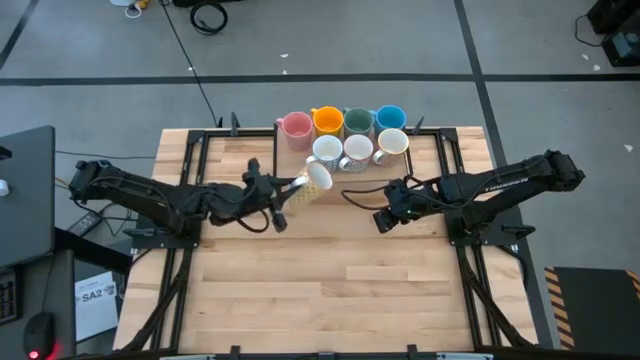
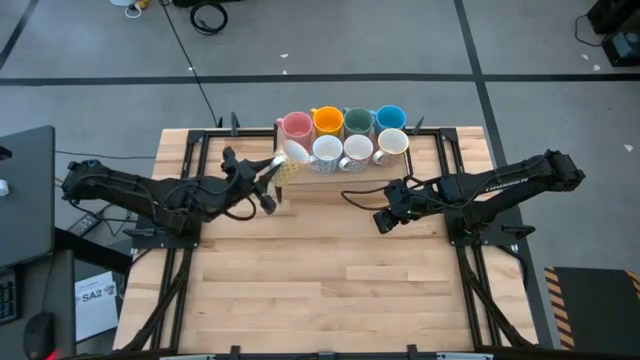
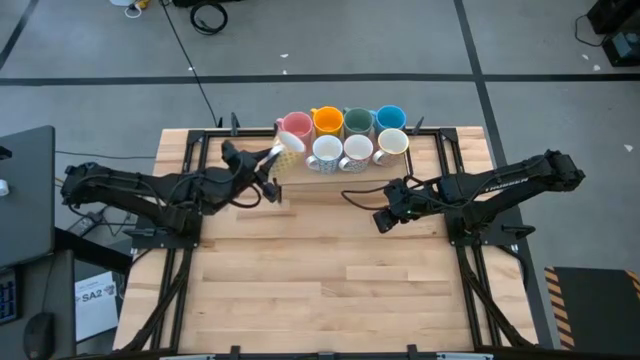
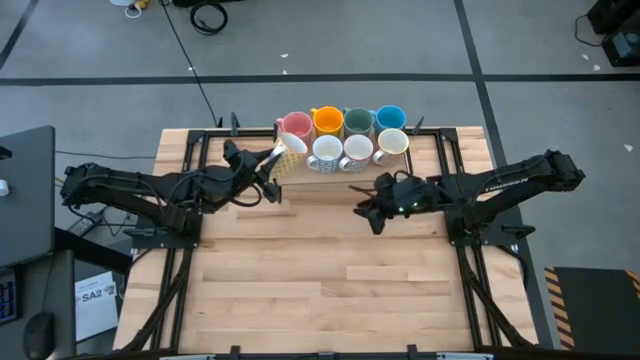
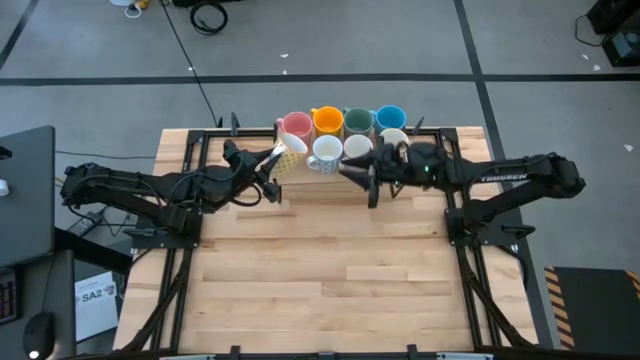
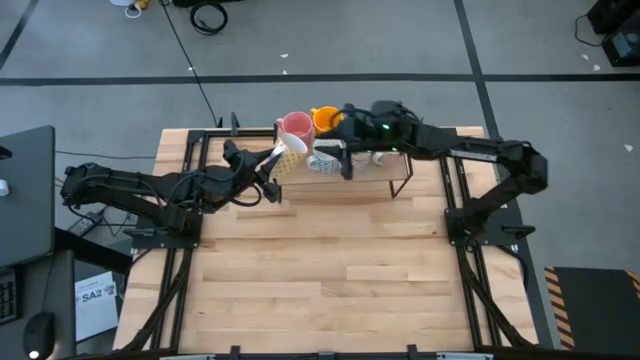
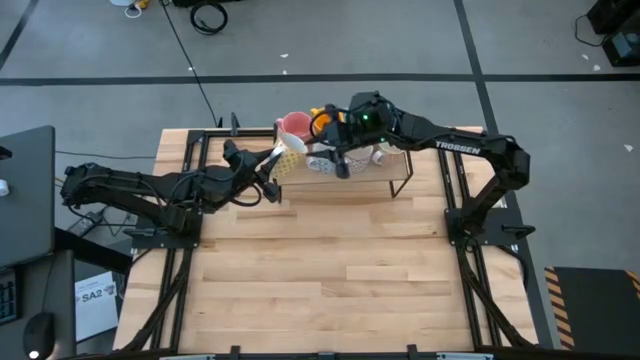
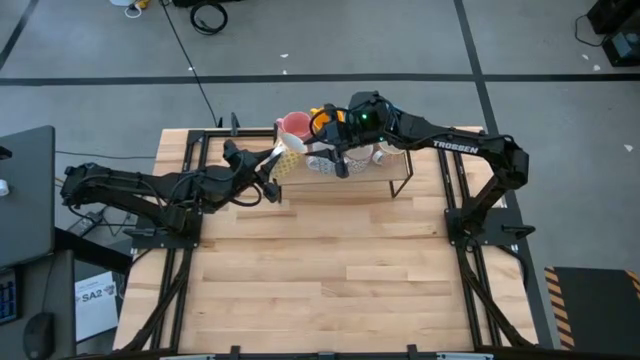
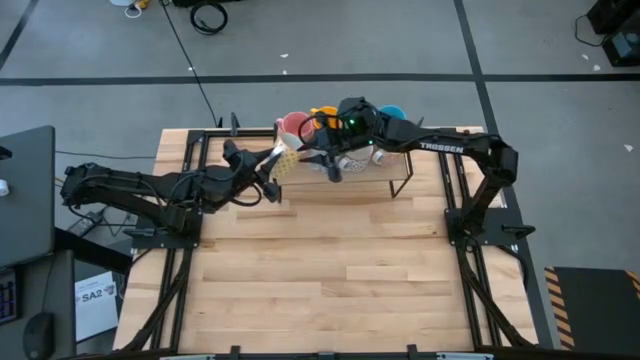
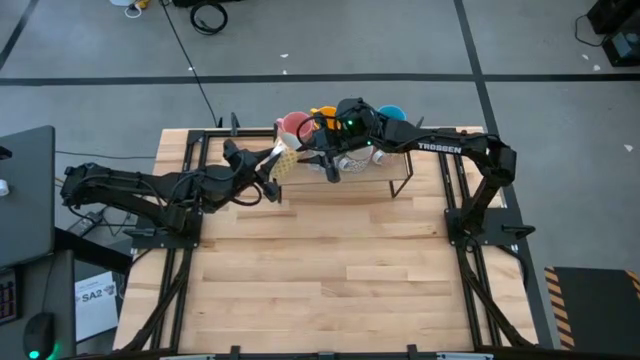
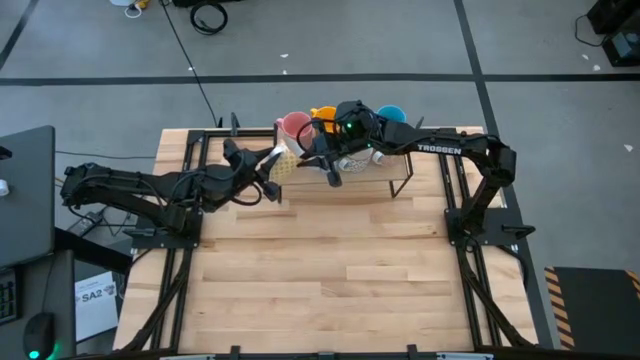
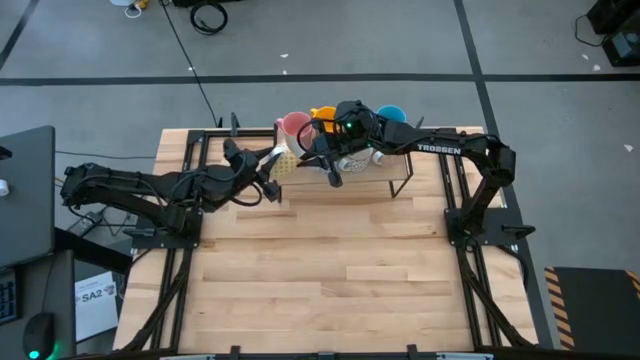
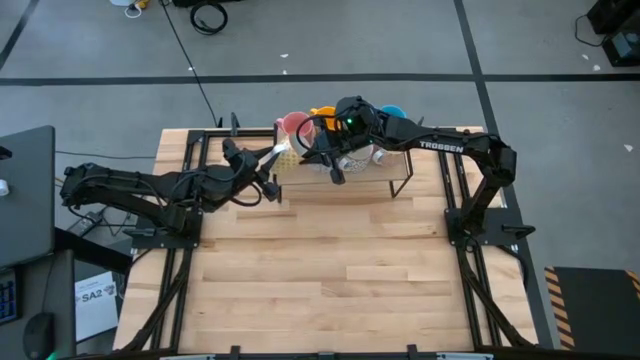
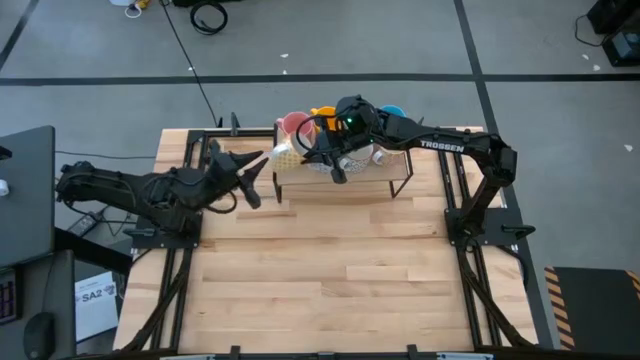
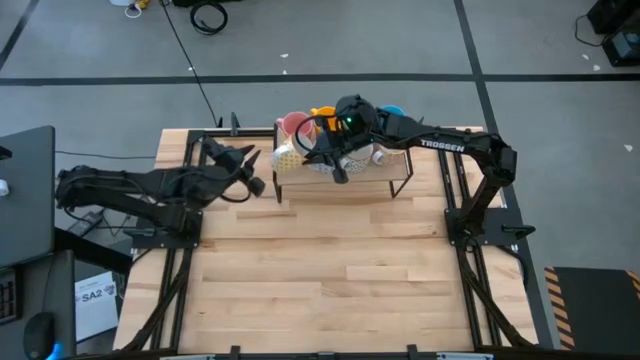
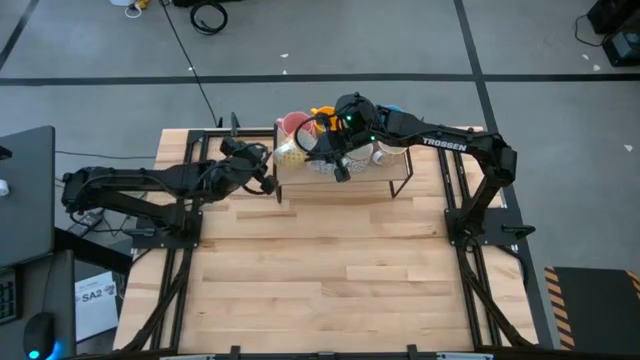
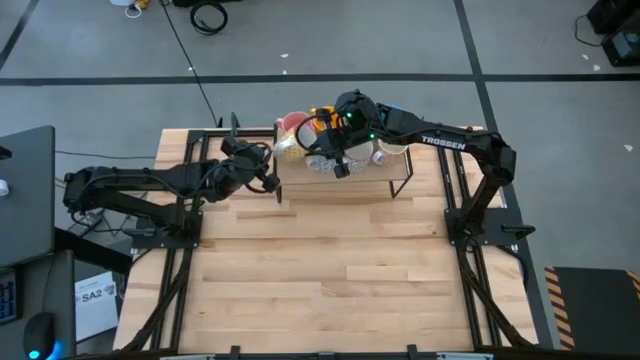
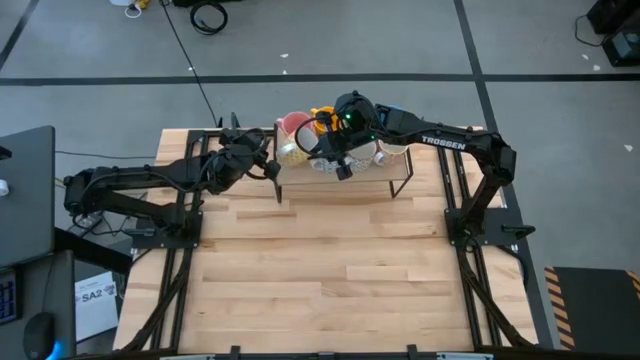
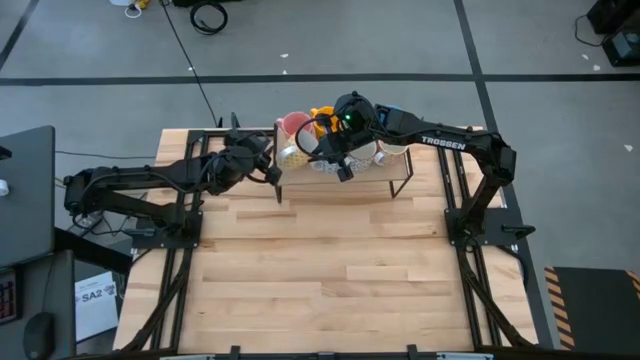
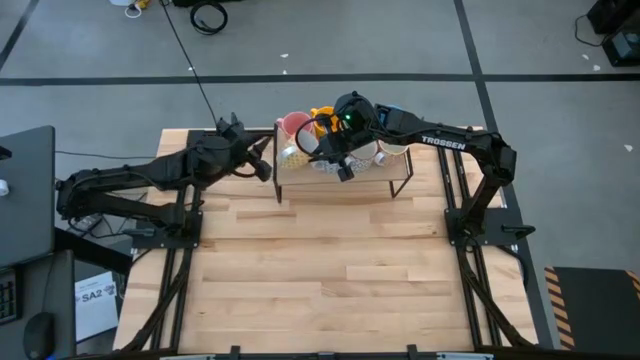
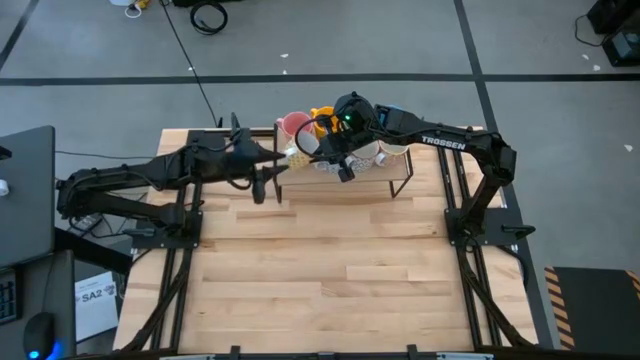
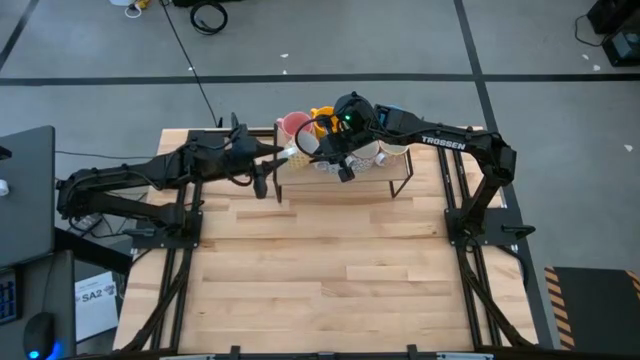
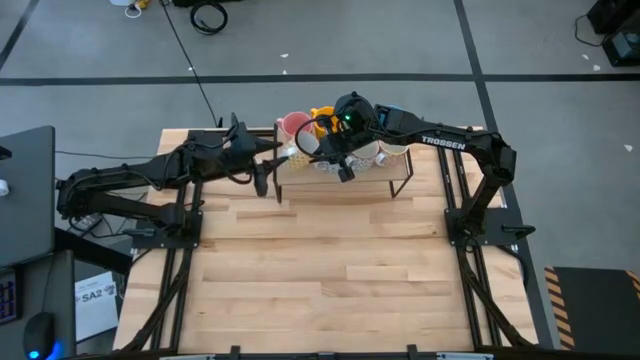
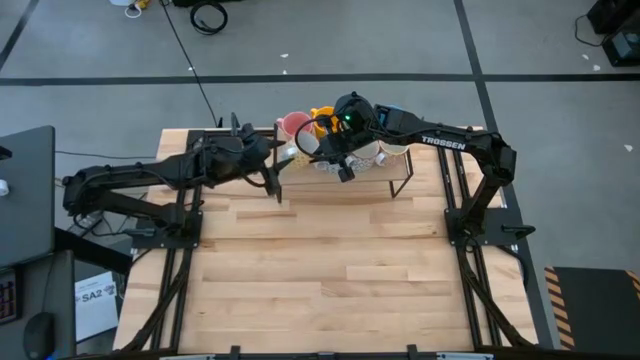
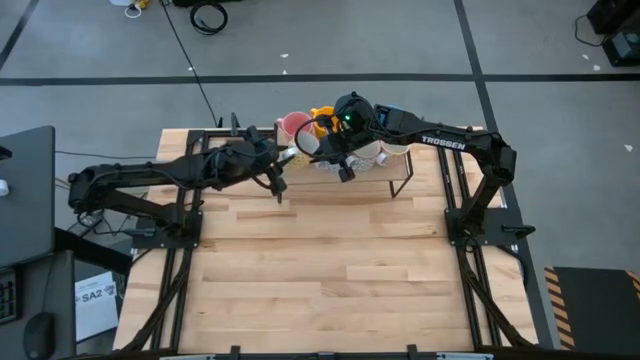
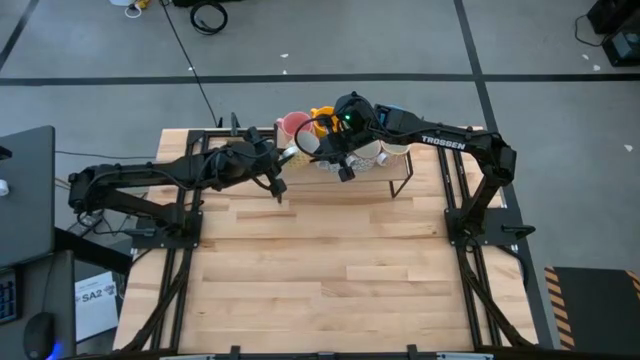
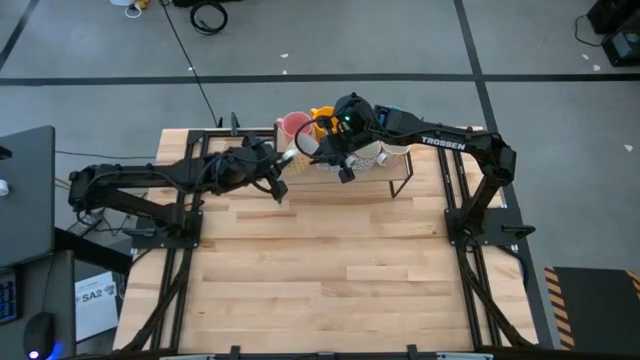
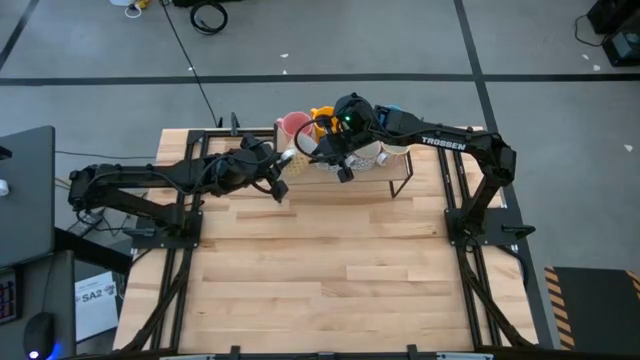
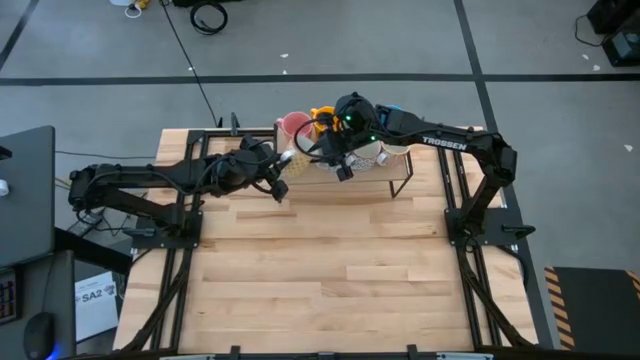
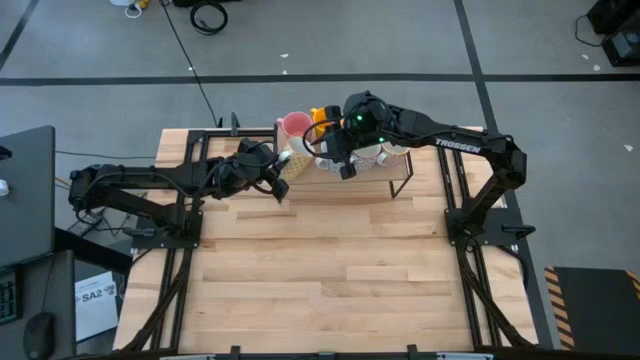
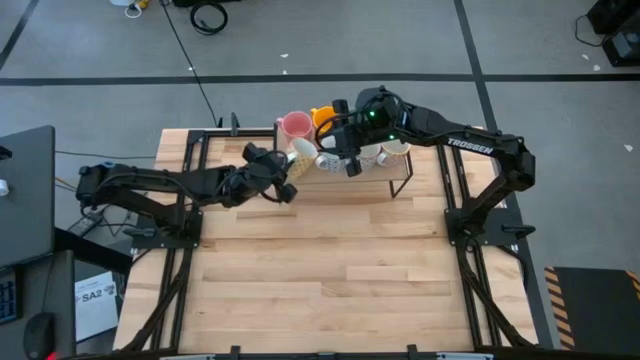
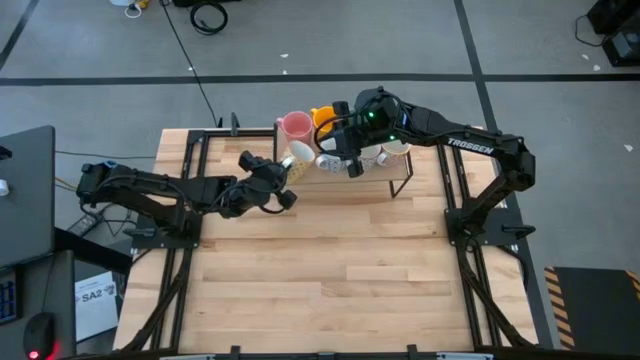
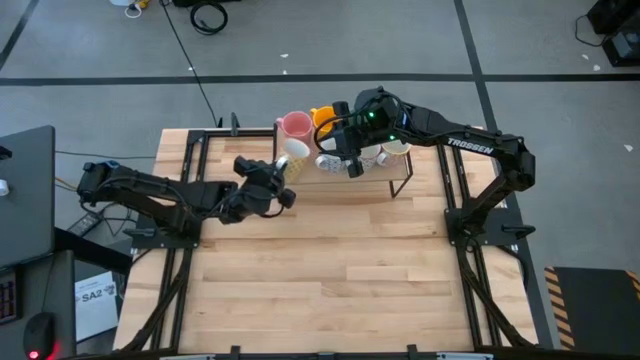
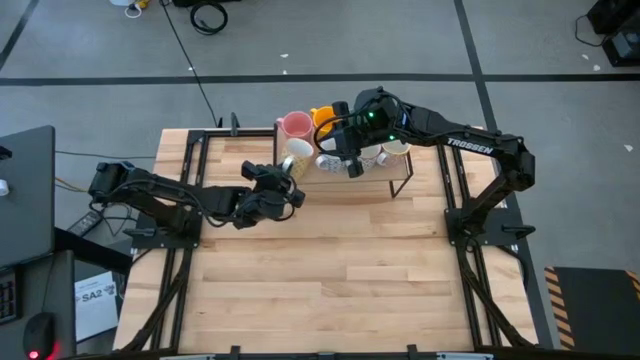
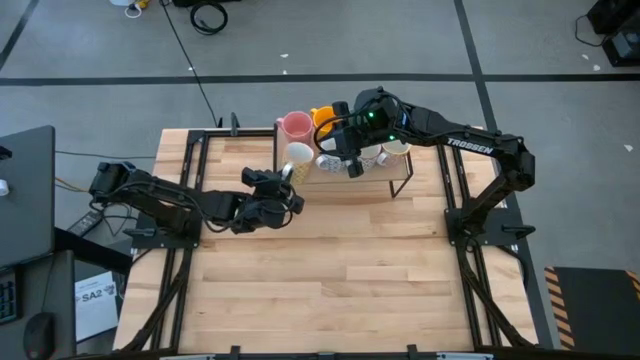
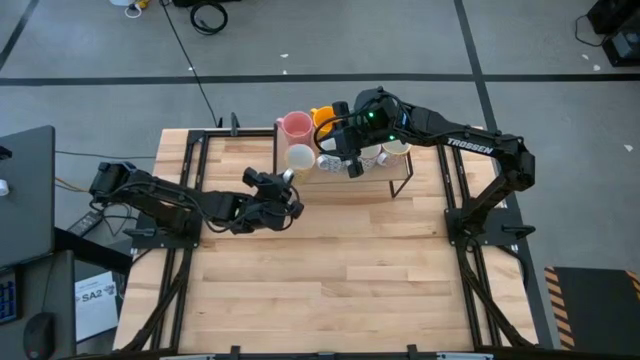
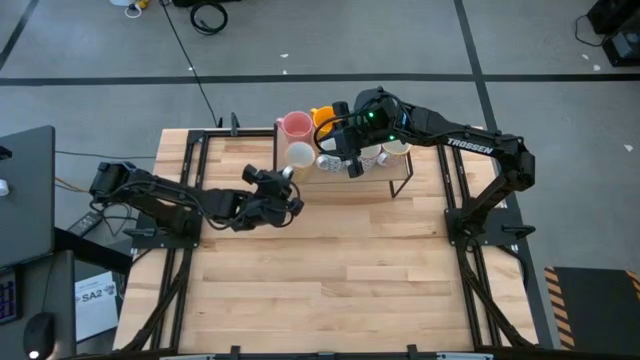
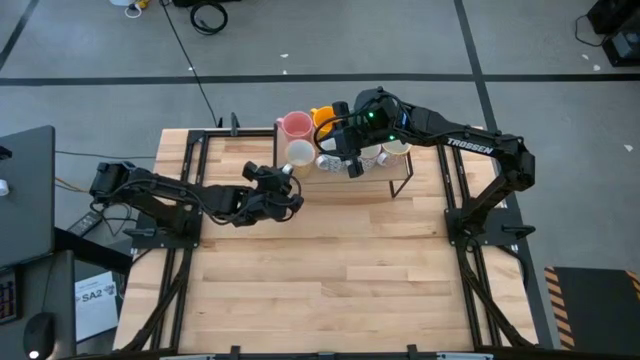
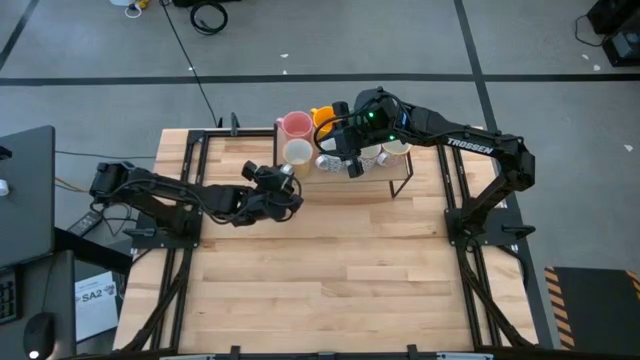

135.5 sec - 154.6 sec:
Task: Place coffee mugs
Put the white-yellow mug on the shelf

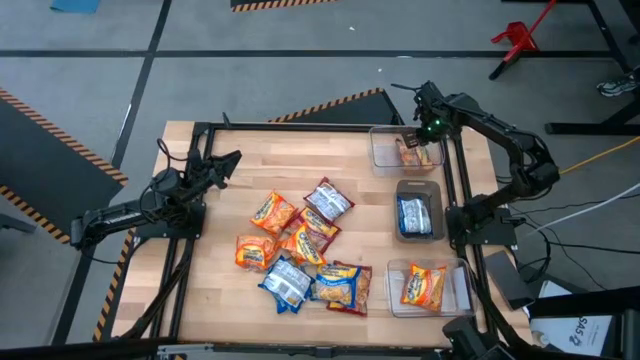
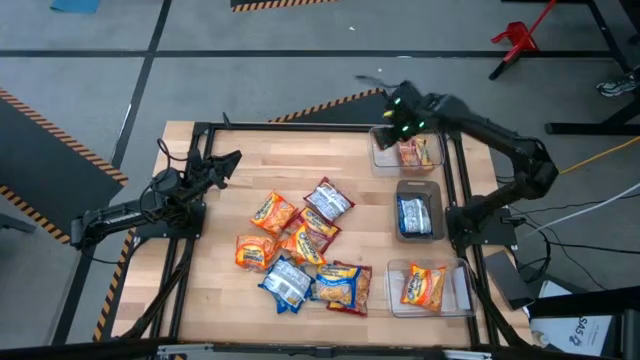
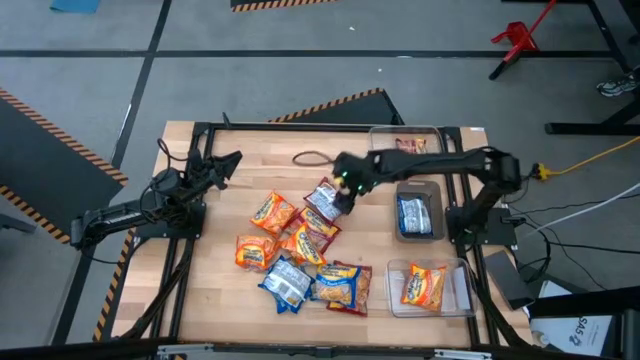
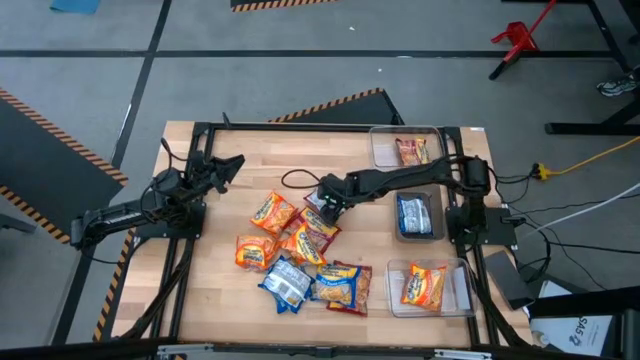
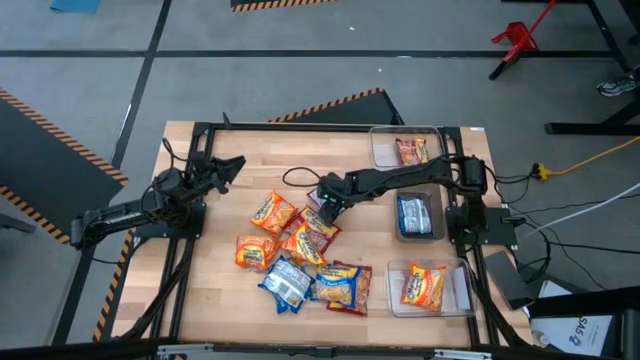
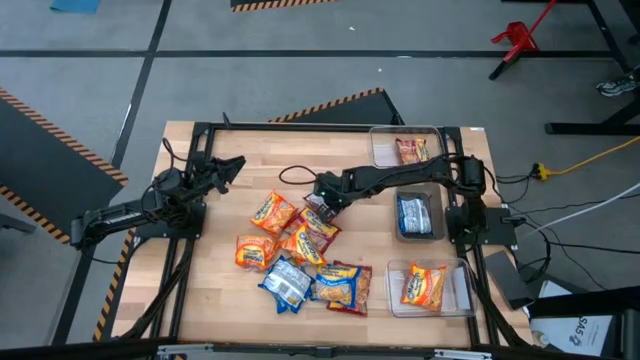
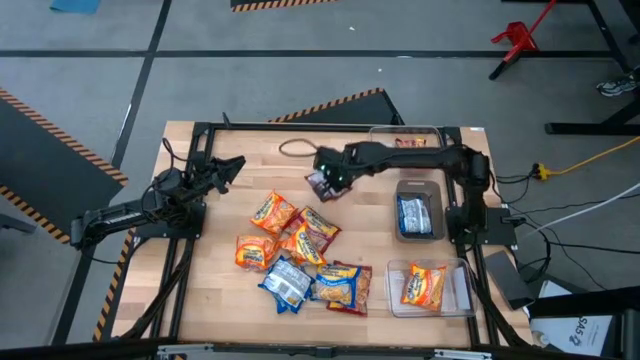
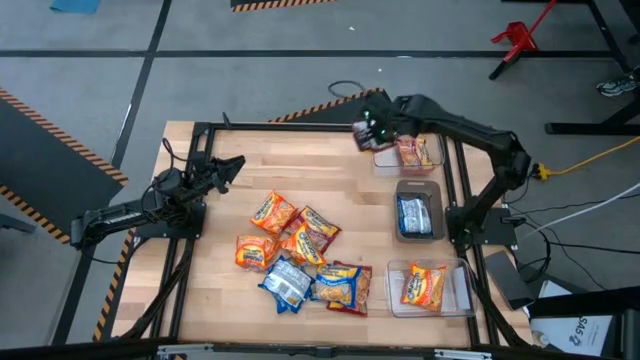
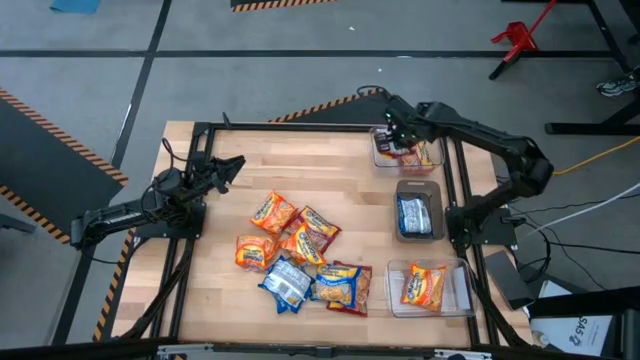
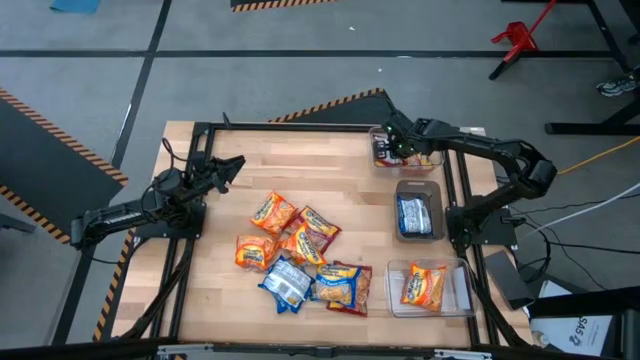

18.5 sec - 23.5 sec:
Task: Sort Maruchan noodles
Put the red noodle pack into the top transparent bin
